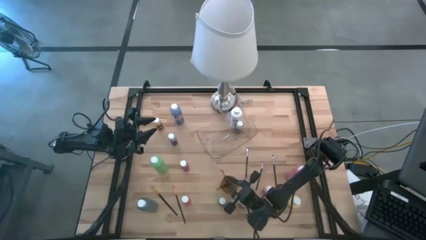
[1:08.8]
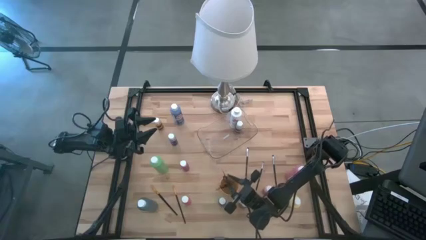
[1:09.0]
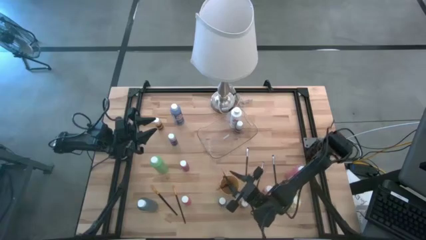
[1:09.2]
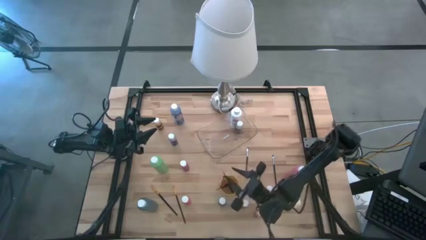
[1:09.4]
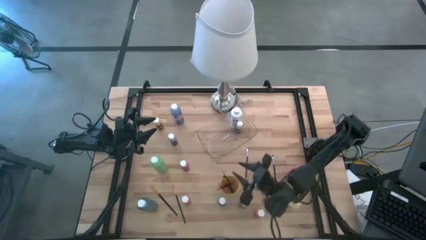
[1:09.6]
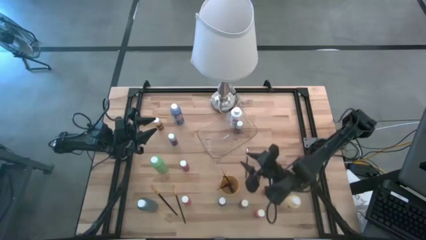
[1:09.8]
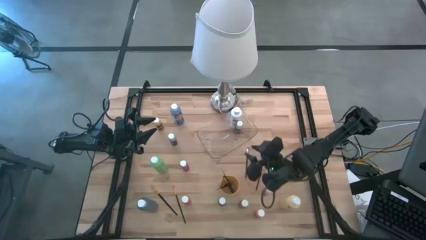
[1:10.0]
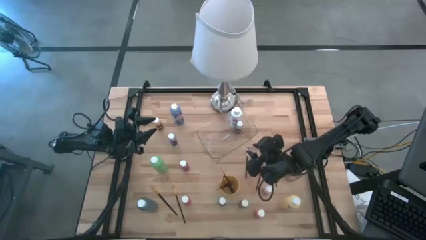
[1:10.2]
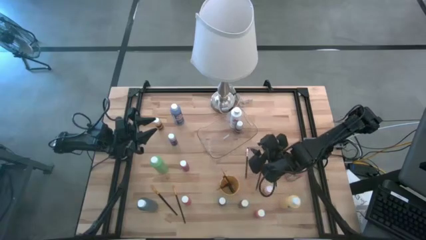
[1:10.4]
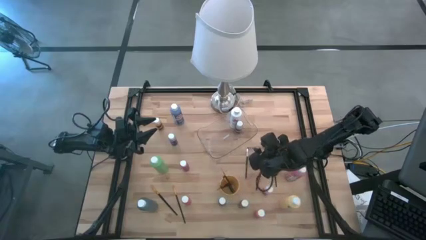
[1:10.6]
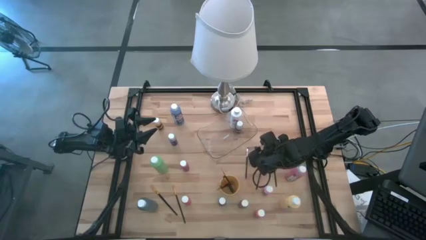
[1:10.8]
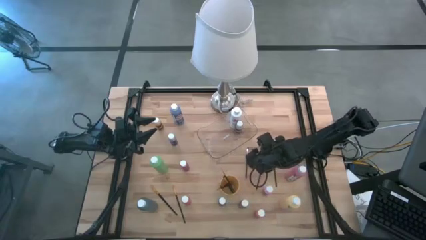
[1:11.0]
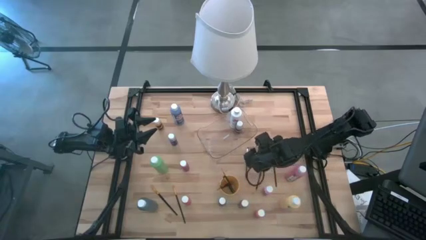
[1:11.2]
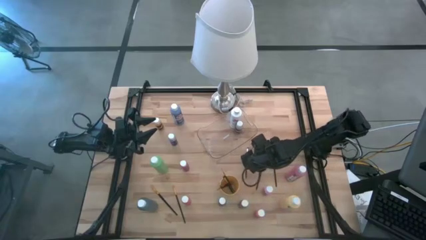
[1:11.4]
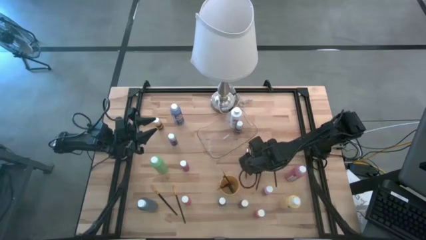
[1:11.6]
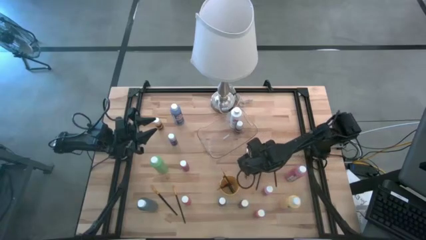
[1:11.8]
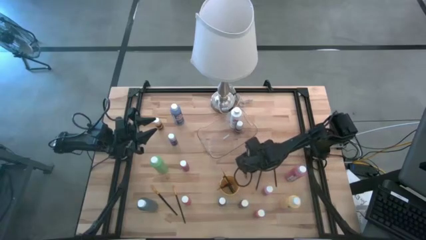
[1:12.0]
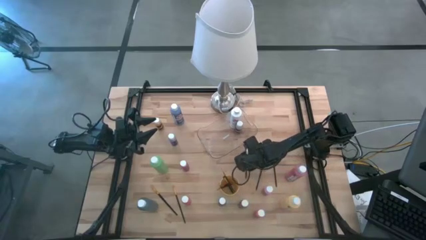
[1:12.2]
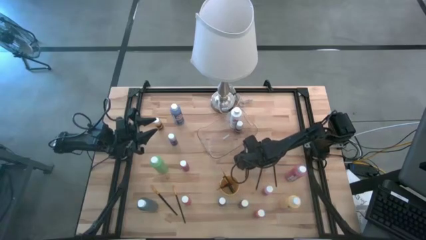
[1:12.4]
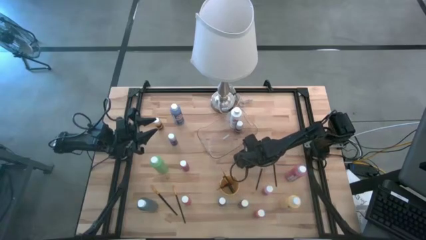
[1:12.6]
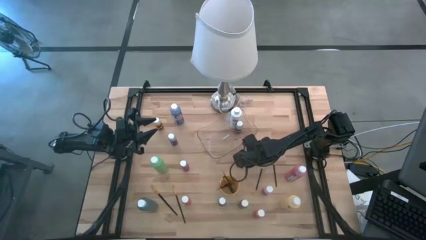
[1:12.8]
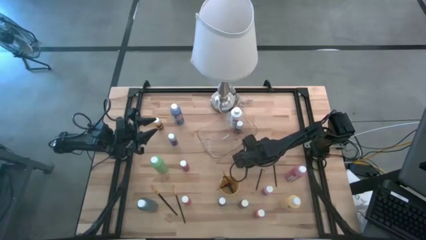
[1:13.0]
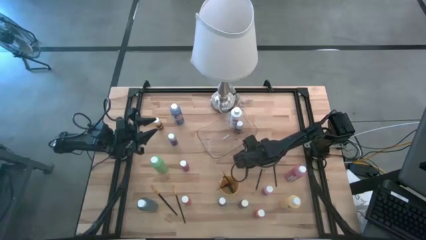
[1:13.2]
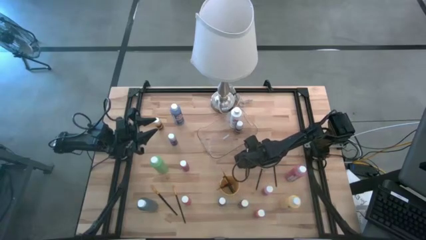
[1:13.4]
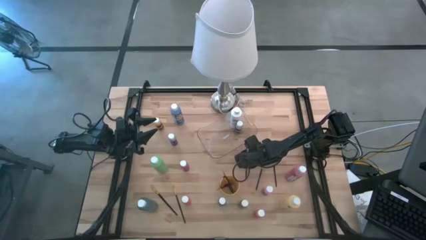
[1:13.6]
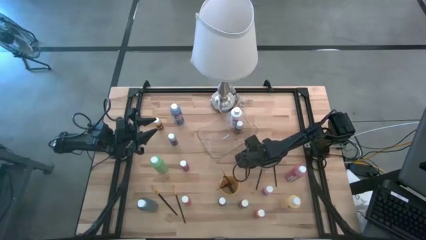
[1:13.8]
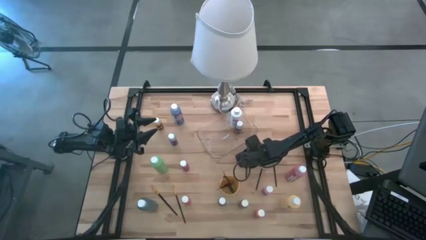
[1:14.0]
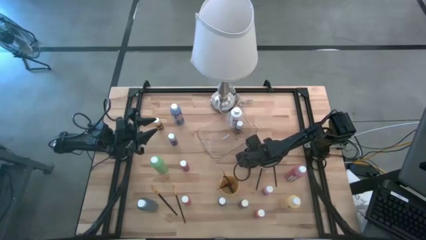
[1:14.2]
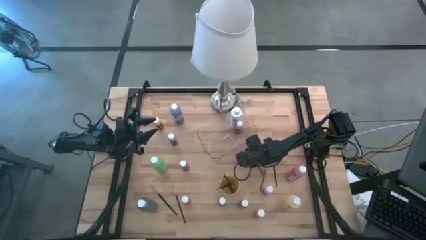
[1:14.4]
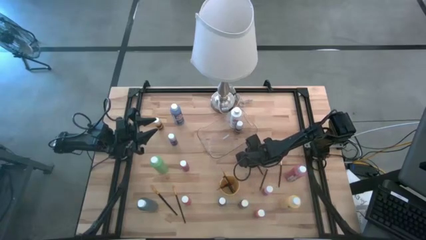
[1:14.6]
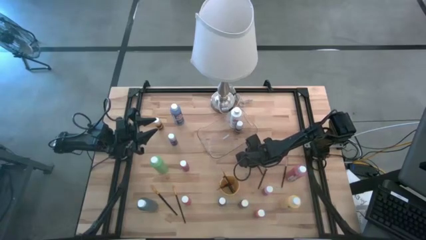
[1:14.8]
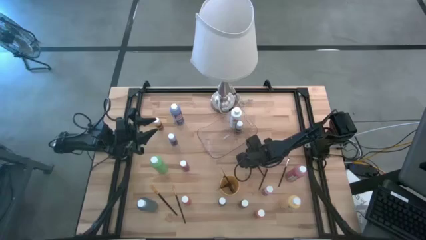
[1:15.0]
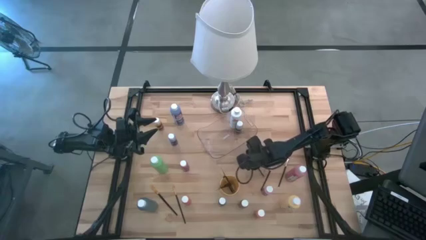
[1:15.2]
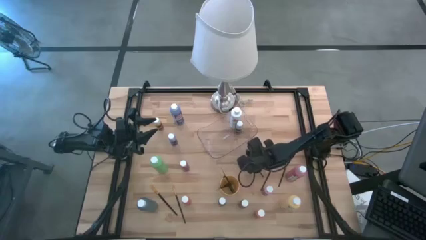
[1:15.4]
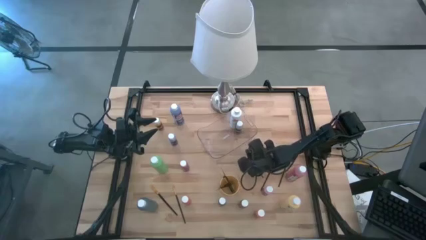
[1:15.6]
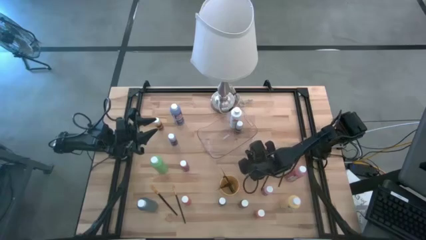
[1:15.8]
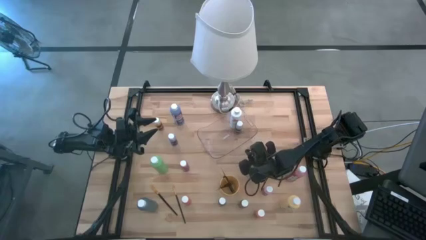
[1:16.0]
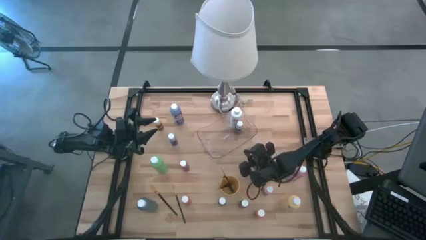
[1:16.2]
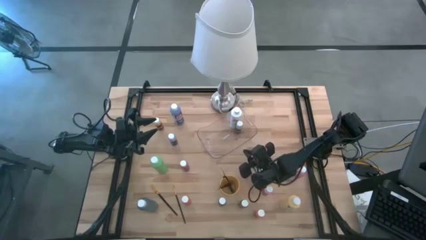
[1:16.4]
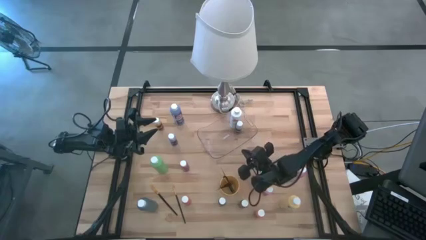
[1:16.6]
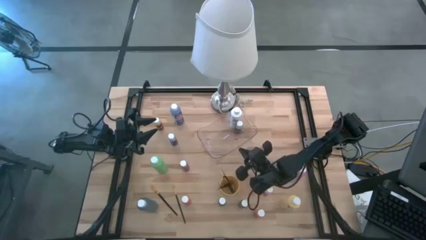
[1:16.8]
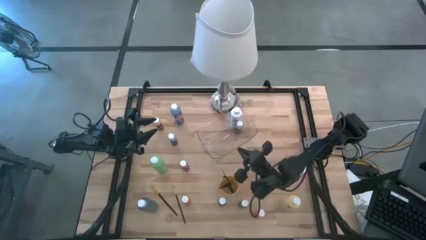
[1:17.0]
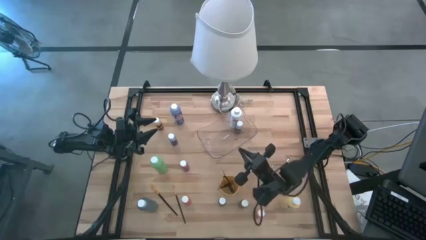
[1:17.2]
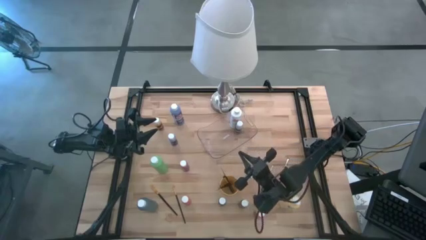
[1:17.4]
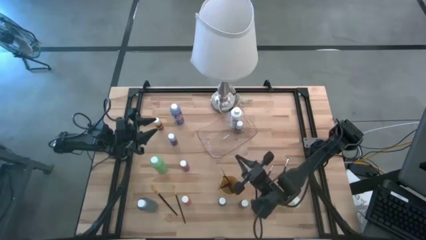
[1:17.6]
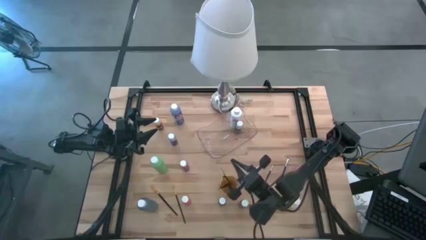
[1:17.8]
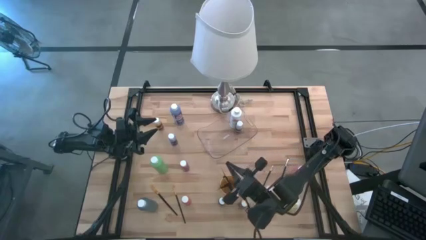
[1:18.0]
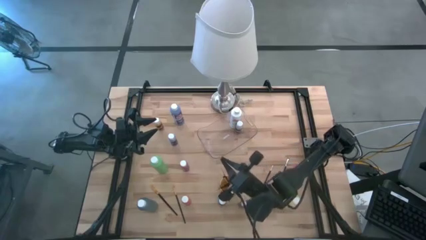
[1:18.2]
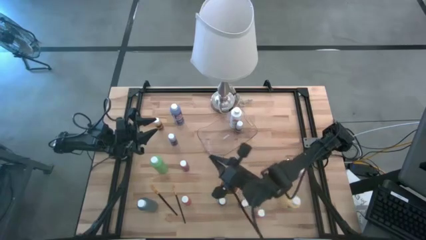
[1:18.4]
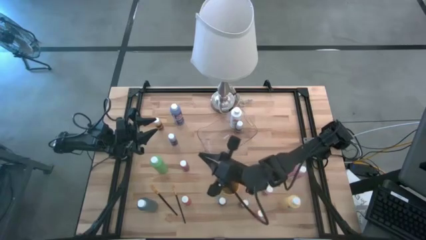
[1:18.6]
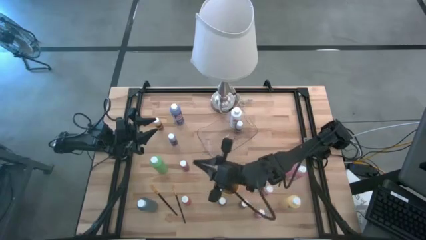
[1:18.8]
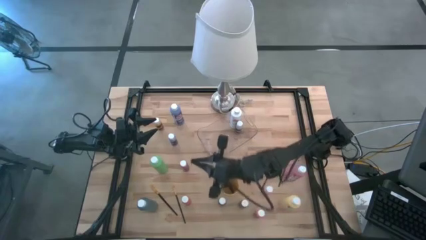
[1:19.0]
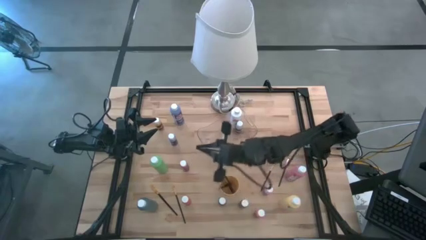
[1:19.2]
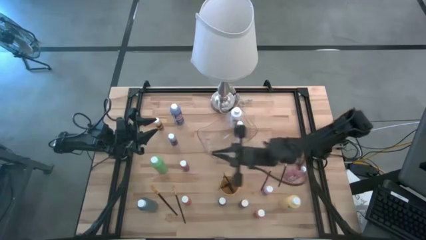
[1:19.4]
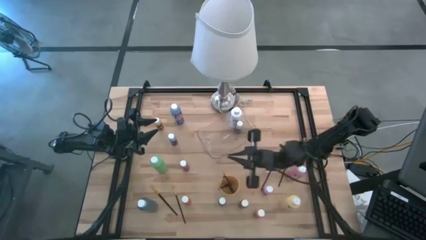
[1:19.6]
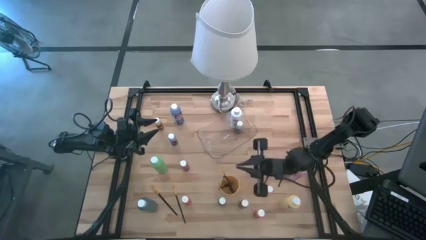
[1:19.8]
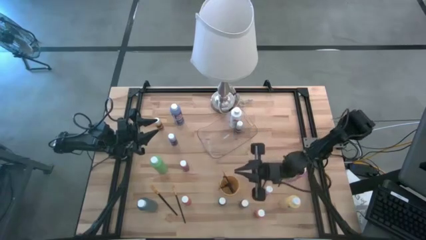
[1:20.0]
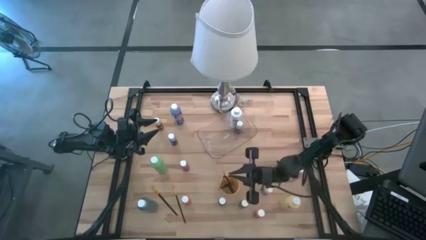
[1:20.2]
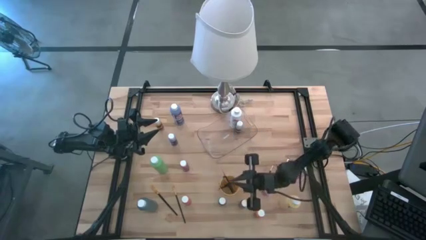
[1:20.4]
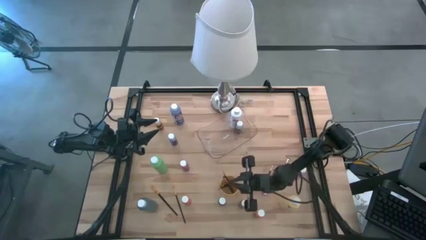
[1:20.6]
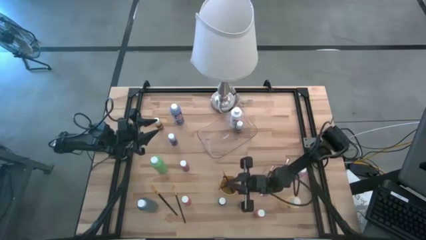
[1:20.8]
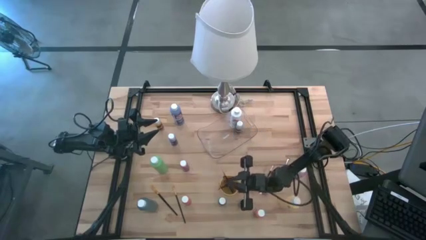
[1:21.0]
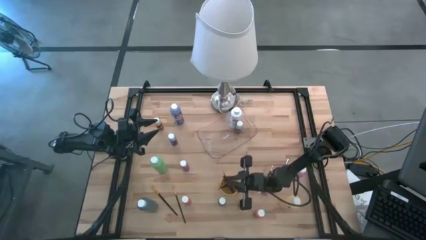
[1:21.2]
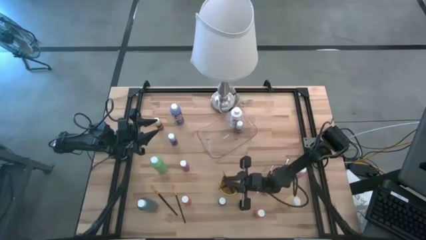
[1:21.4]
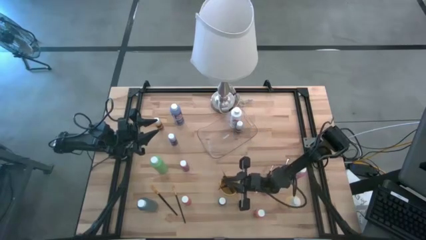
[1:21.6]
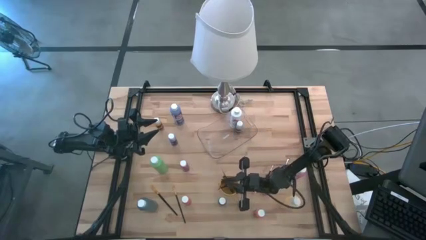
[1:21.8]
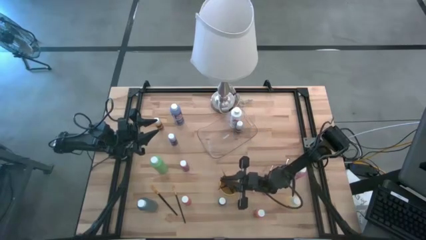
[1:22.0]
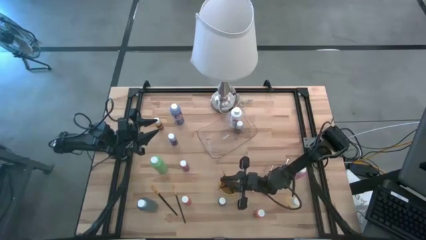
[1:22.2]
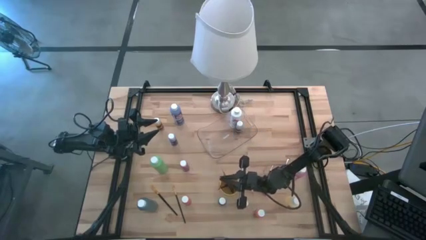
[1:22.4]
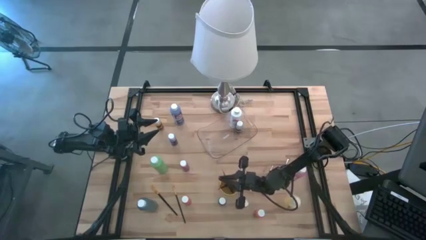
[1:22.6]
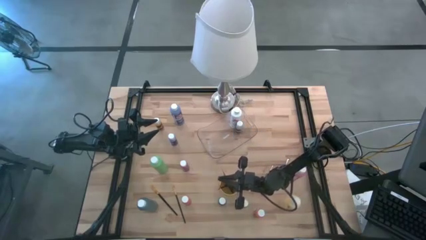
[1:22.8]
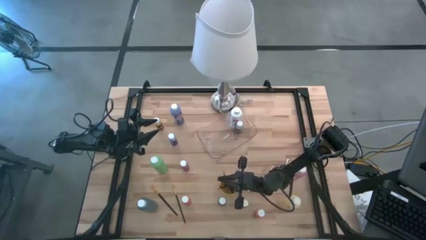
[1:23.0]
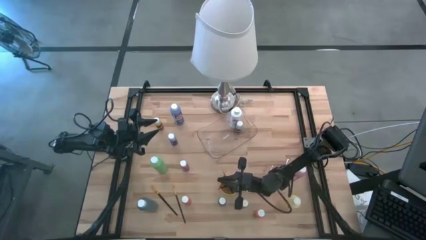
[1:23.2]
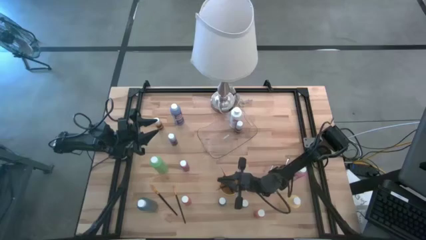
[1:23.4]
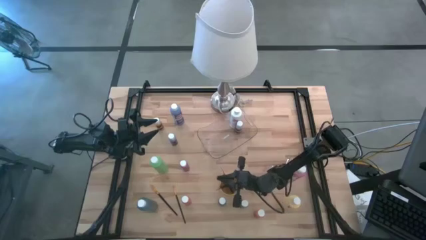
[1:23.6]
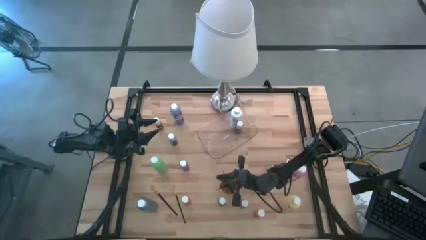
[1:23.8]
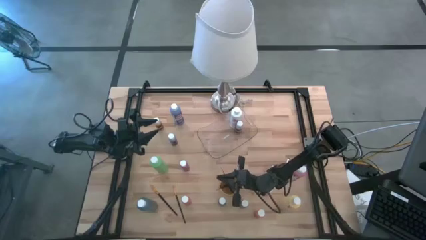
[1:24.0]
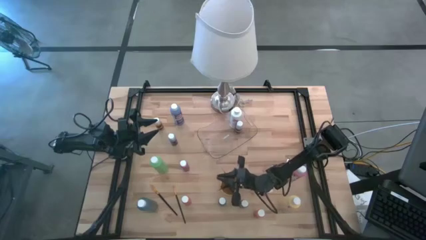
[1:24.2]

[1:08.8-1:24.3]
Task: Pick & Place Paint Supplies
Put the black paint brush into the yellow cup
